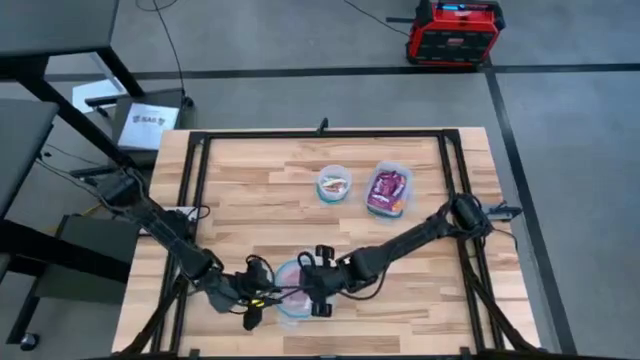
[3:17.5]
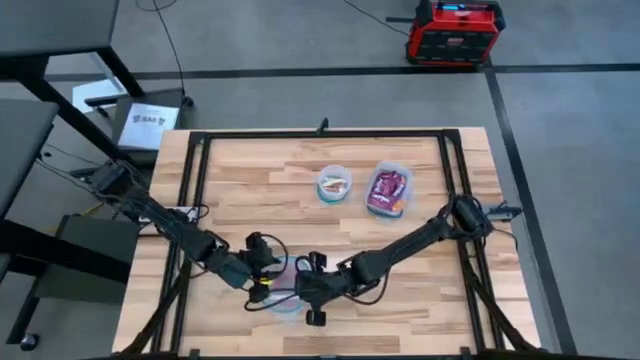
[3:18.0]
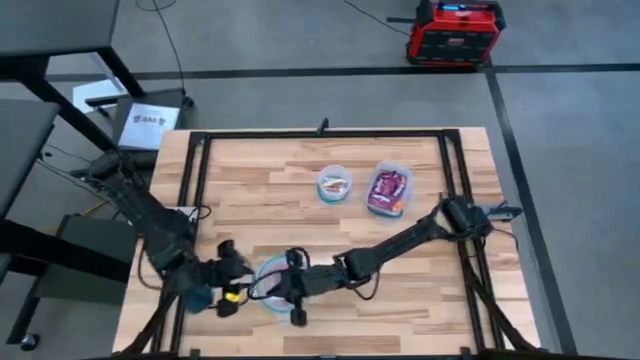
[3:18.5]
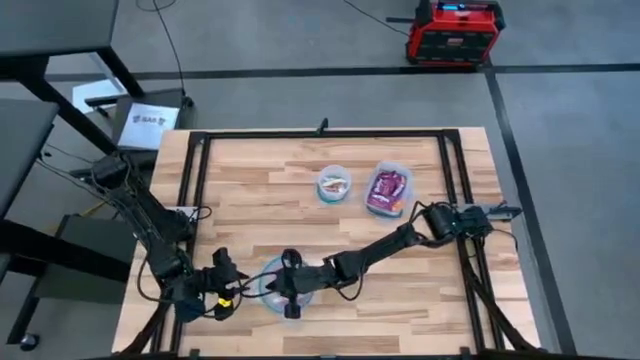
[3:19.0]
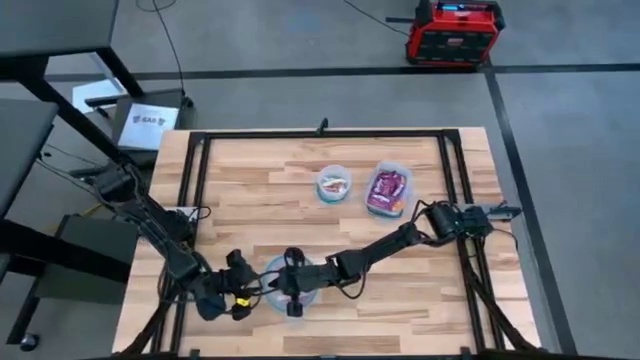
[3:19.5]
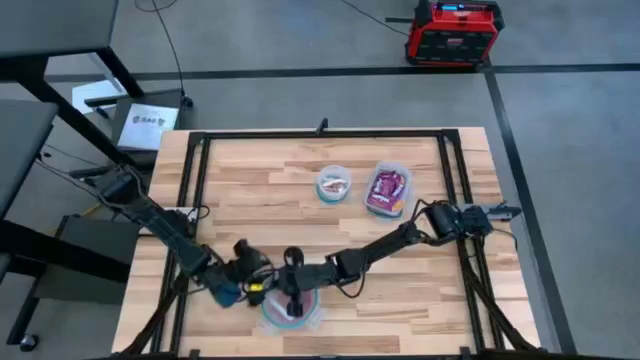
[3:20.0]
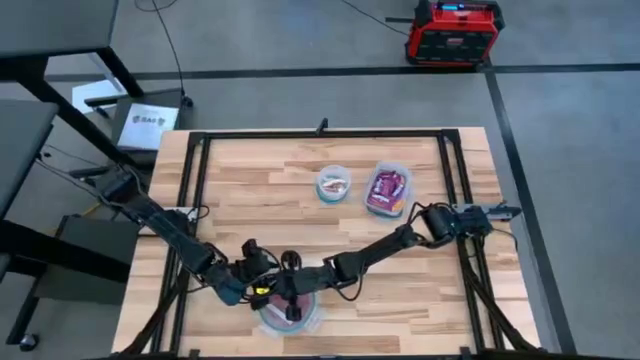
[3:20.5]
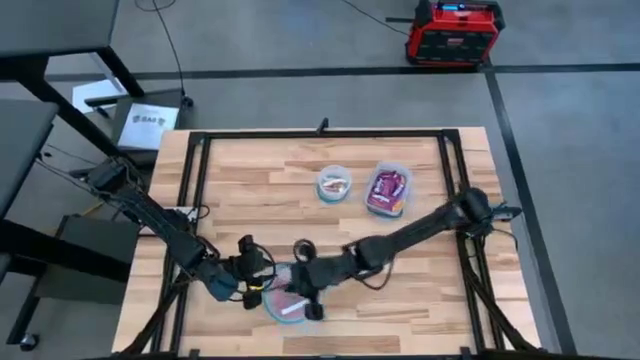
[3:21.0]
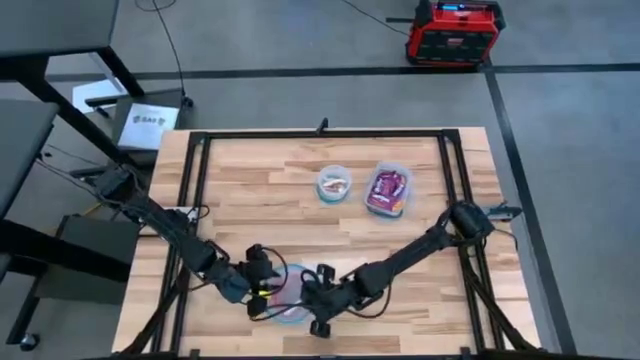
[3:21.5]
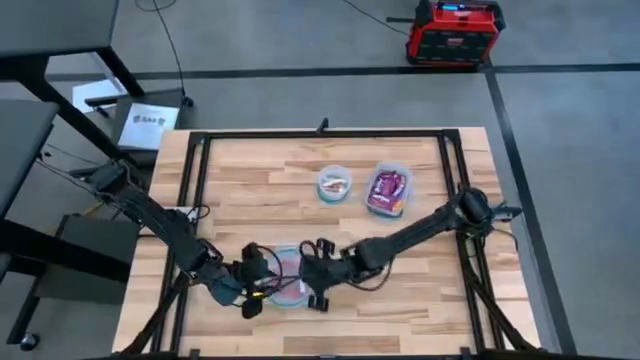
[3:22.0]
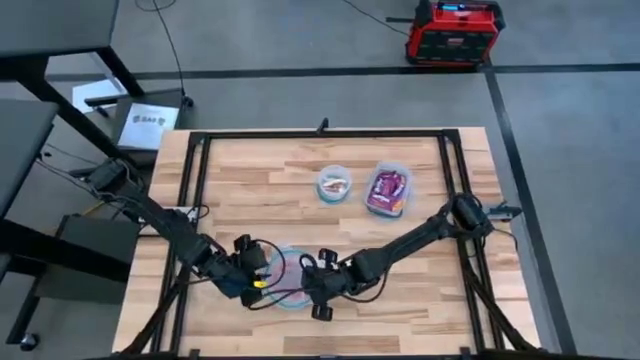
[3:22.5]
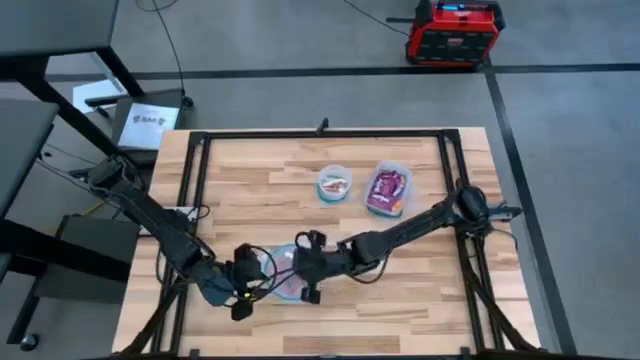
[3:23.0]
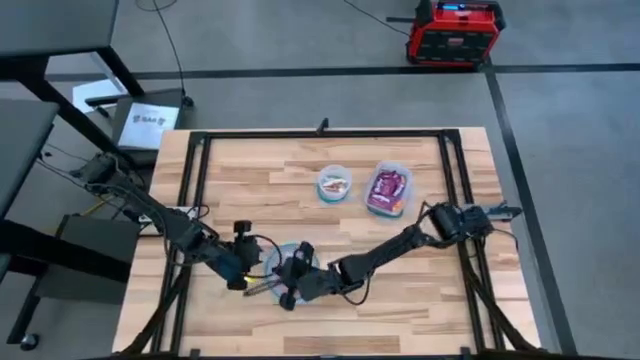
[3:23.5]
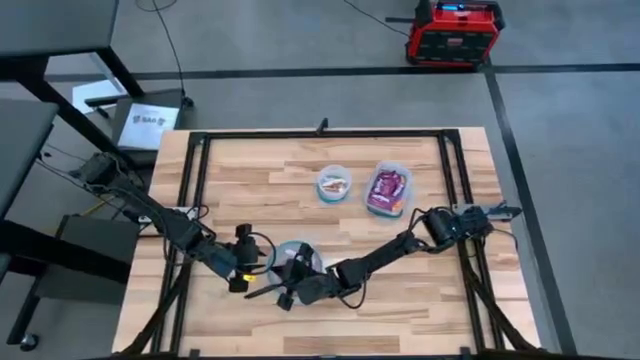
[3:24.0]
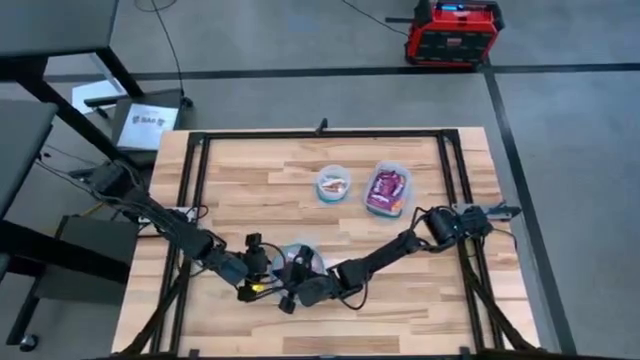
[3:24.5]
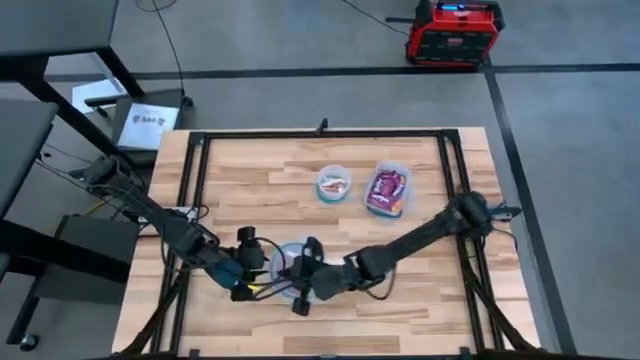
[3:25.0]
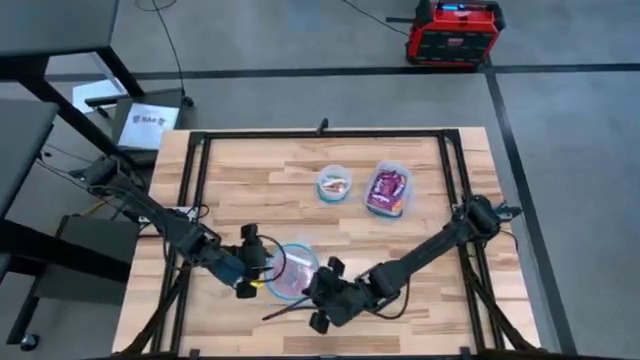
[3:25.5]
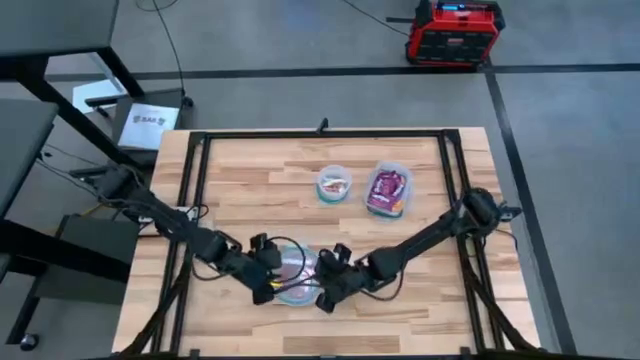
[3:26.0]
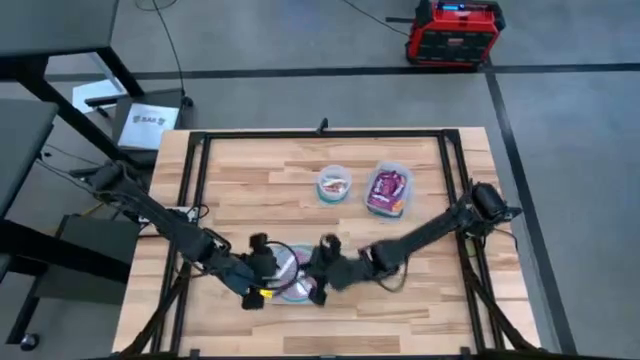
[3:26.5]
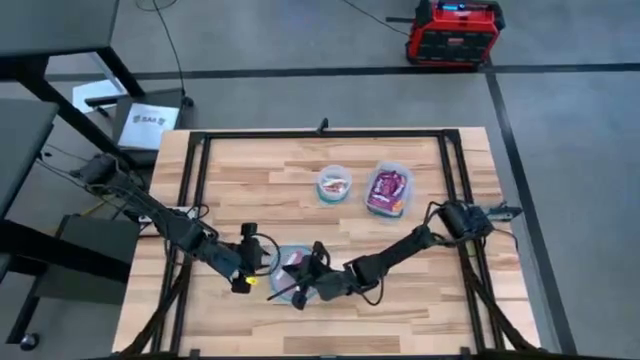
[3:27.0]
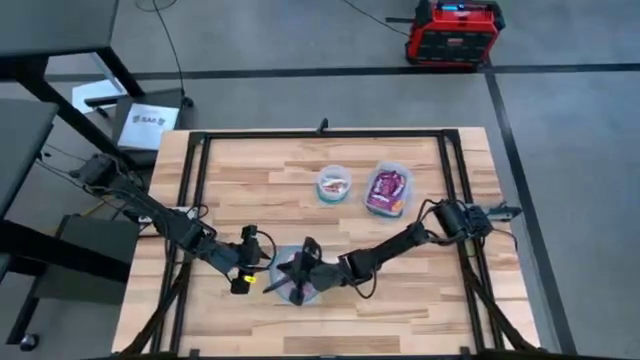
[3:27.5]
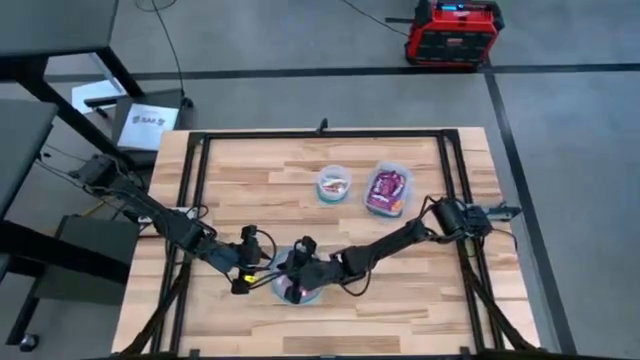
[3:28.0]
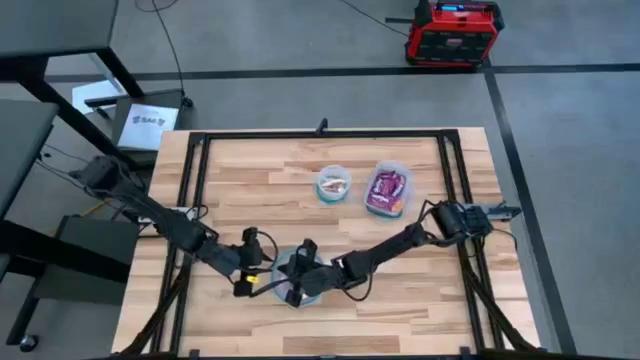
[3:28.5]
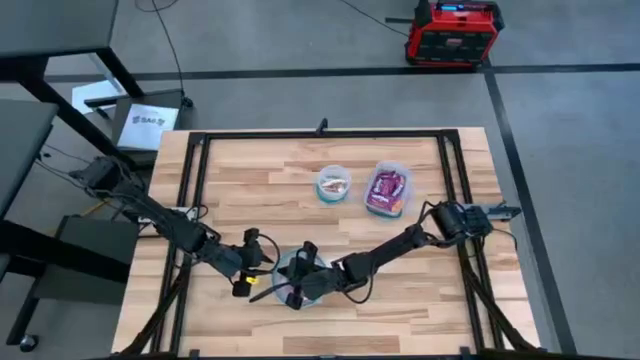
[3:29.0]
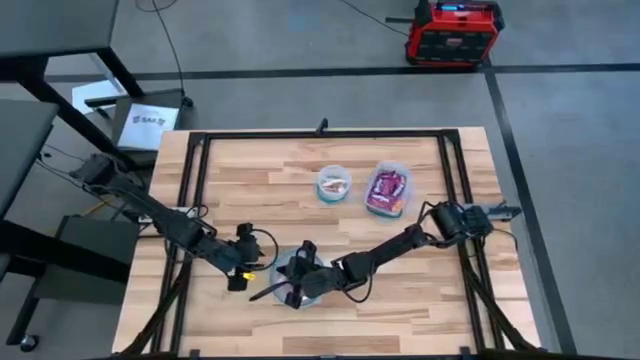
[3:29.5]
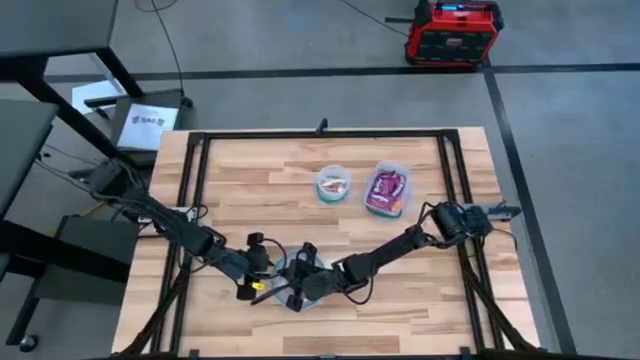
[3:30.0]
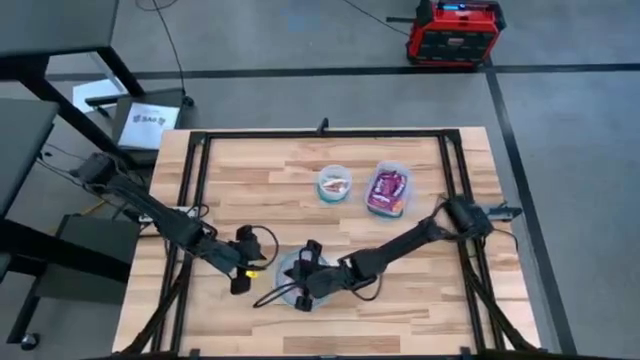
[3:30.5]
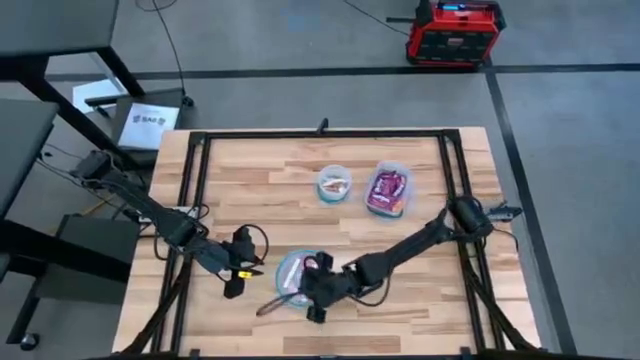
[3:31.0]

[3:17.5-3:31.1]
Task: Sort candy
Close the bottom left transparent bin with the lid

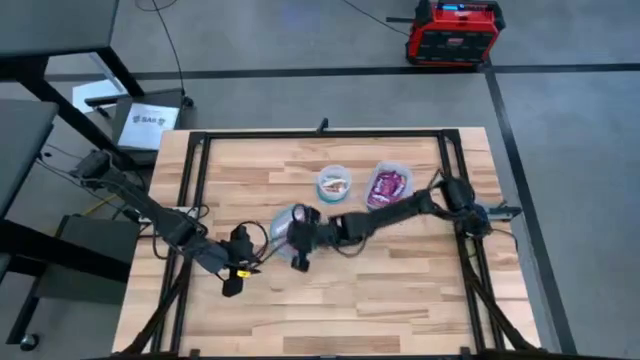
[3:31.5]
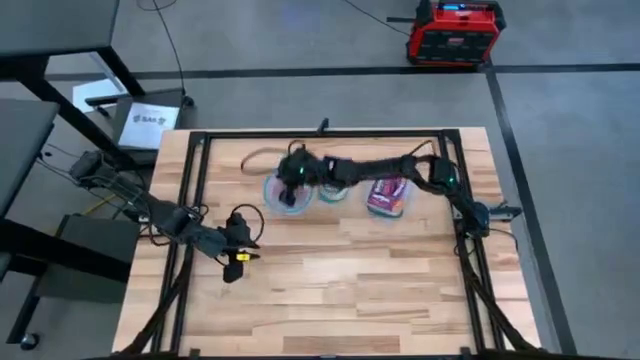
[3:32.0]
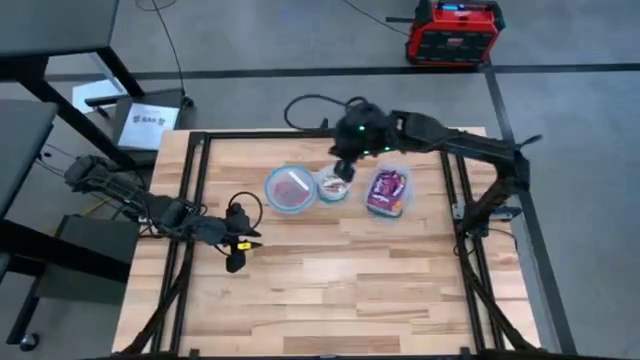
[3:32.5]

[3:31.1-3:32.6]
Move the bottom left transparent bin to the top right

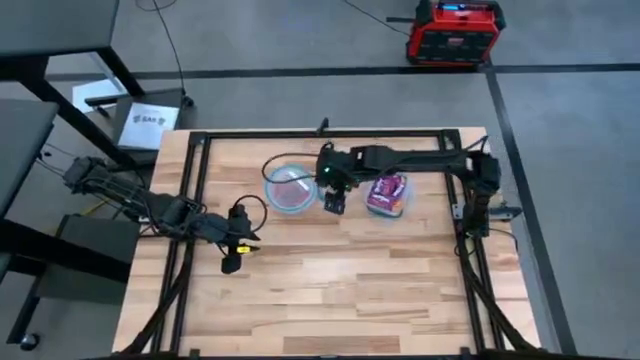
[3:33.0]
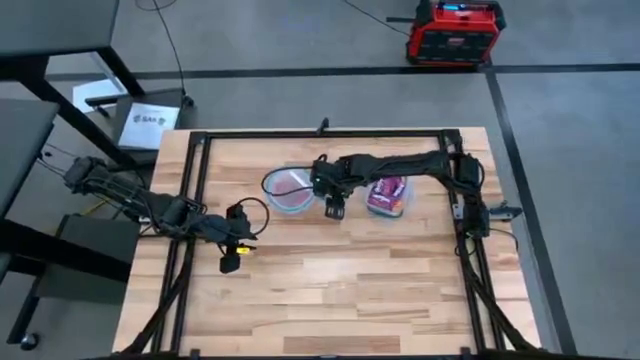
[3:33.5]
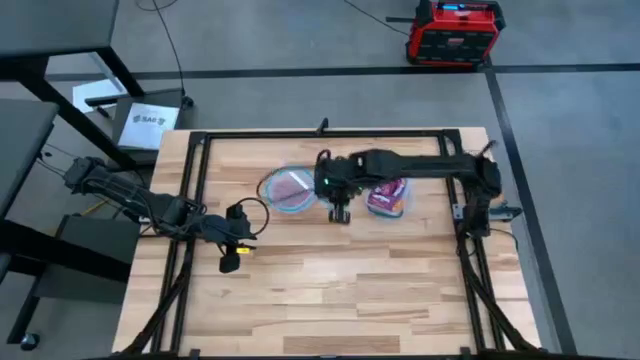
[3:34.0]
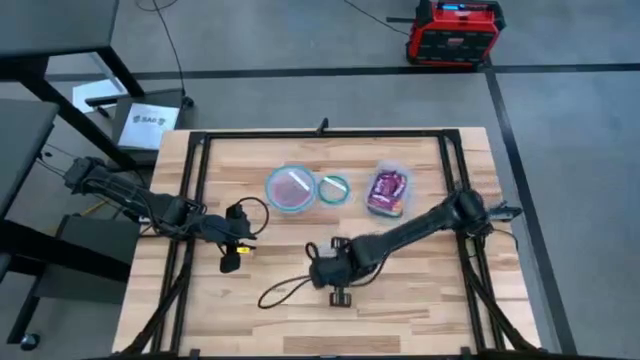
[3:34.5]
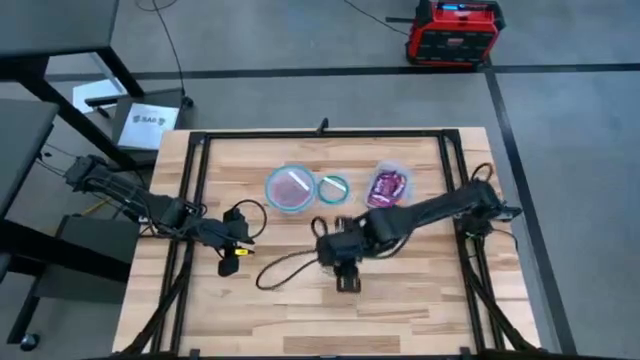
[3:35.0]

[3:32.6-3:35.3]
Move the top center transparent bin to the center

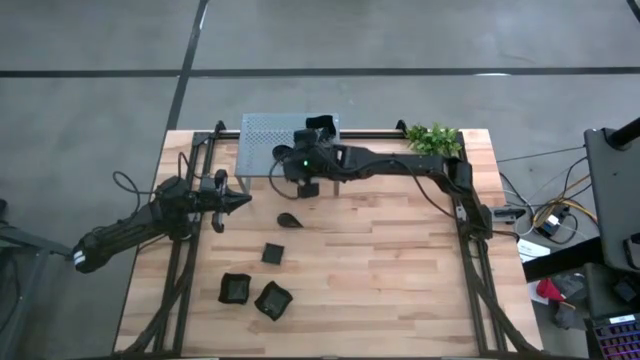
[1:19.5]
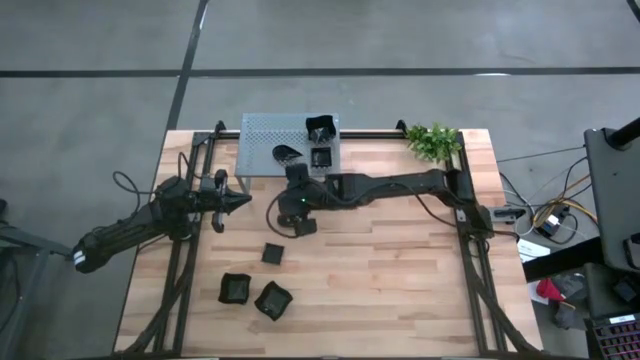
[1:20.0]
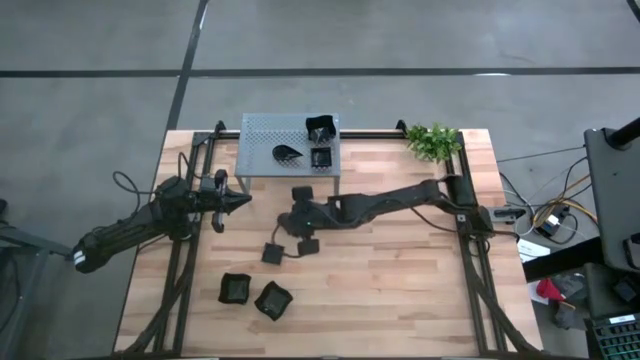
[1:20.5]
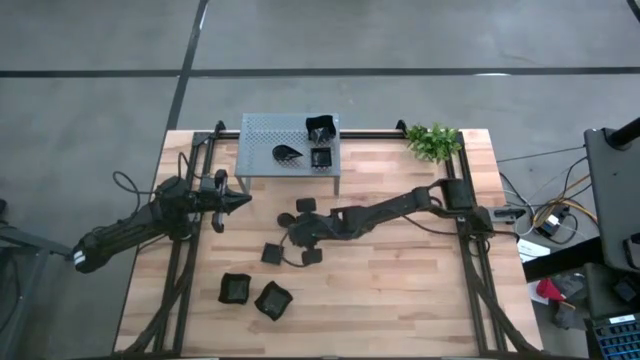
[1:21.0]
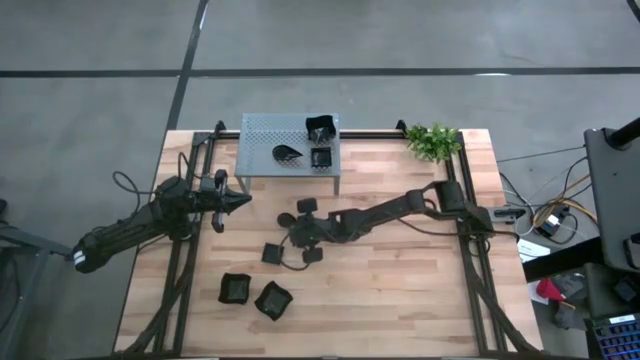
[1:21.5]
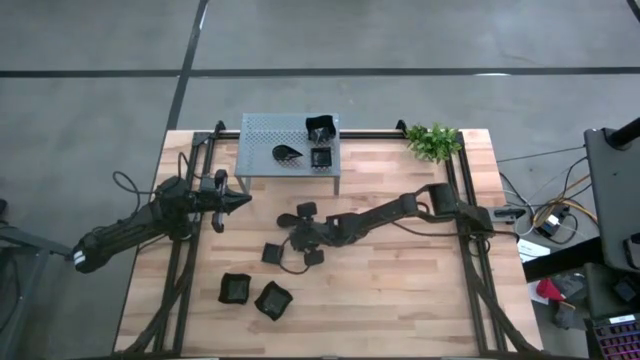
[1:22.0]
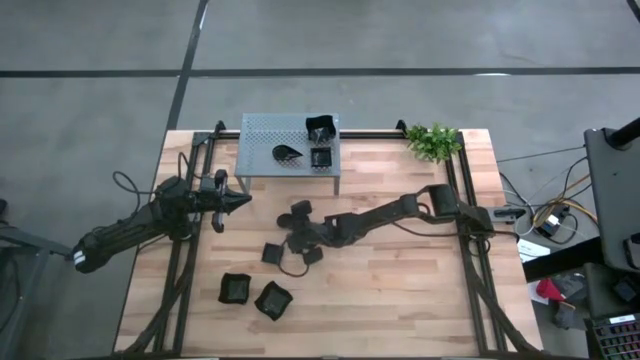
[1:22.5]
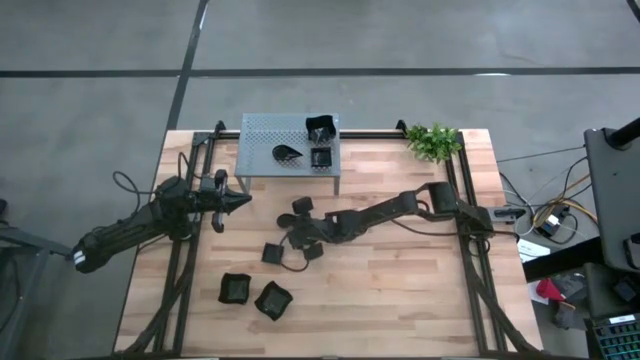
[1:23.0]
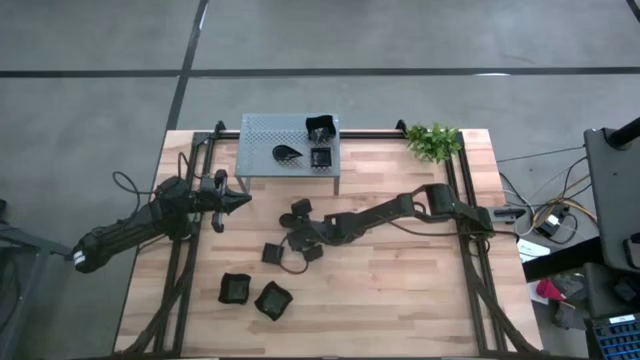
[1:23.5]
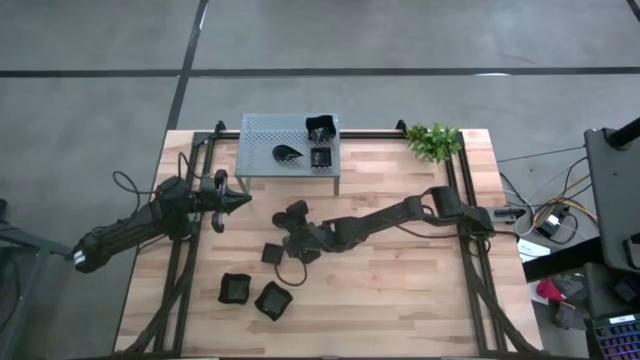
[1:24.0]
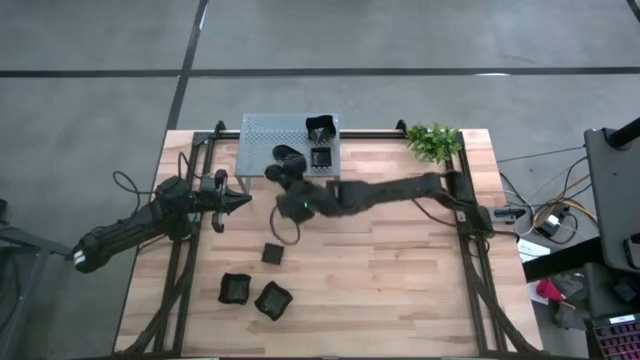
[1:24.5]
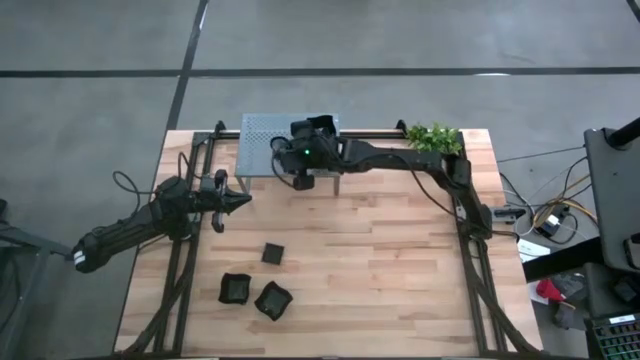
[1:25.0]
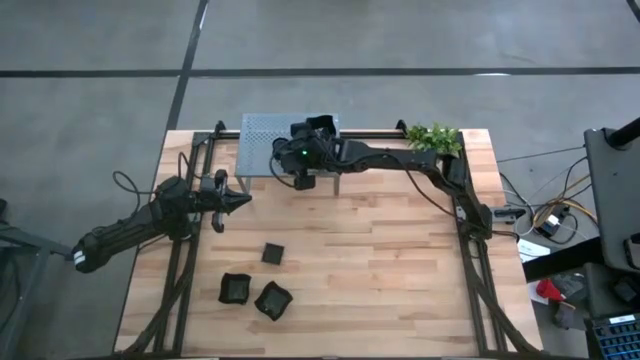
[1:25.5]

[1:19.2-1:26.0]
Task: Pick & Place Mini shaped plates
Stack the black drop shaped plate on top of the black drop shaped plate on the shelf
